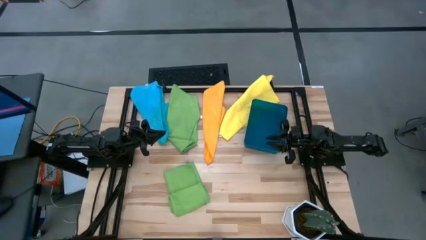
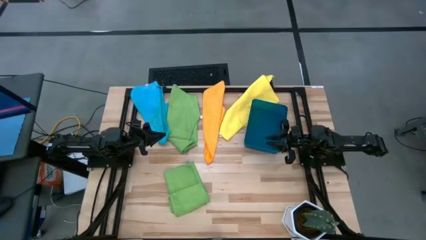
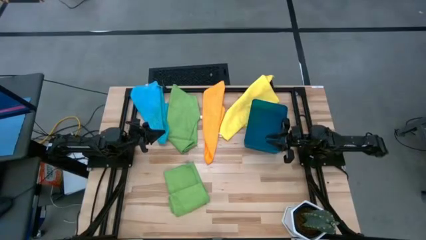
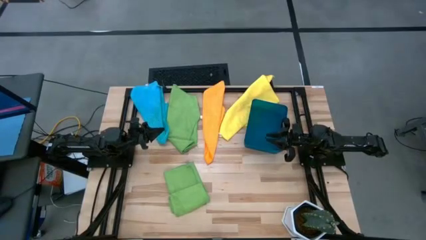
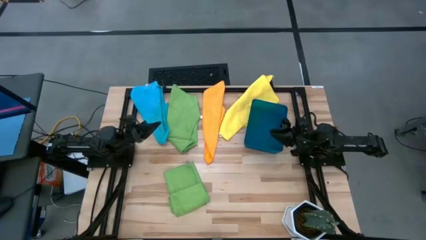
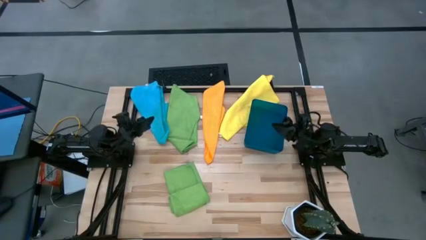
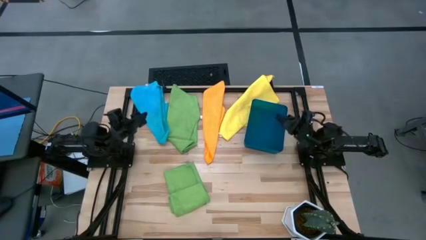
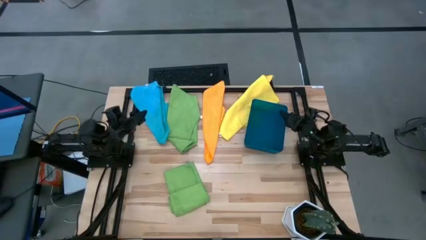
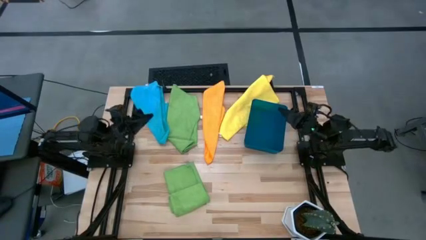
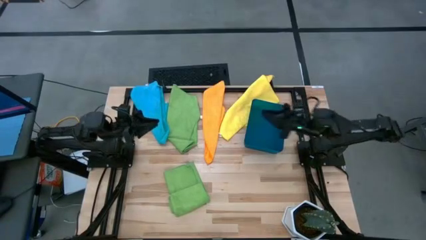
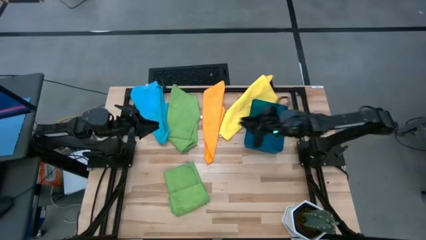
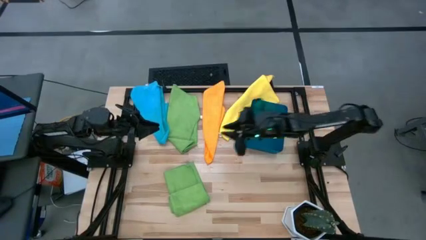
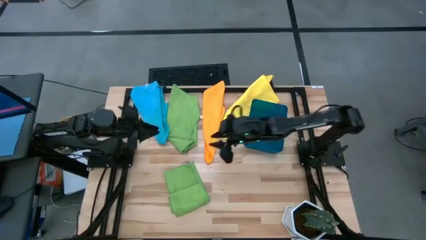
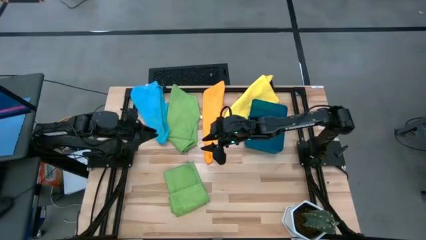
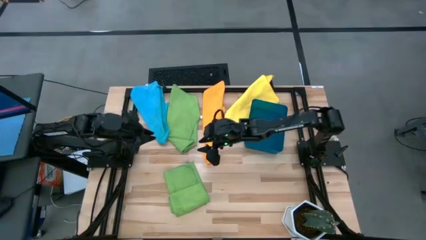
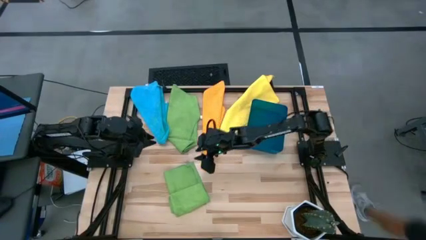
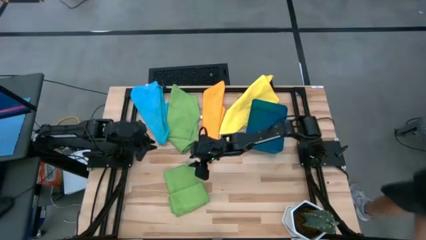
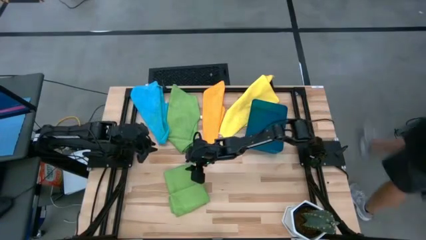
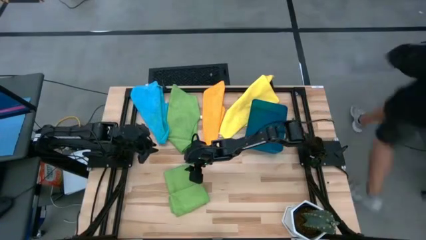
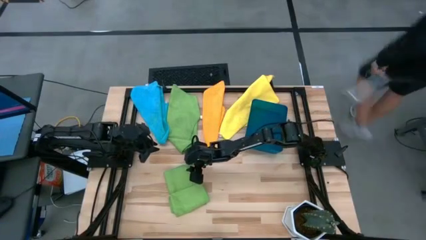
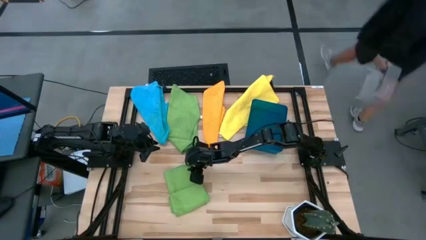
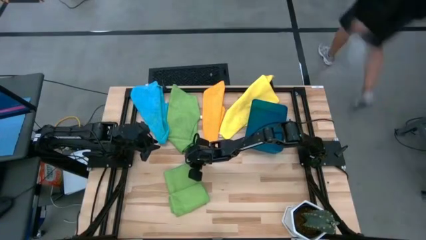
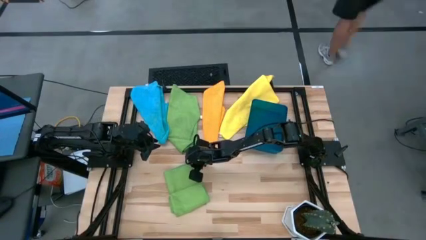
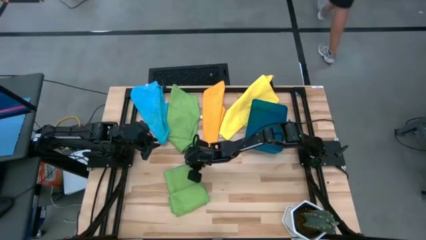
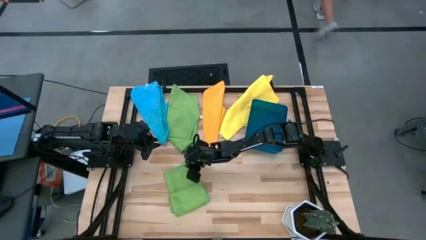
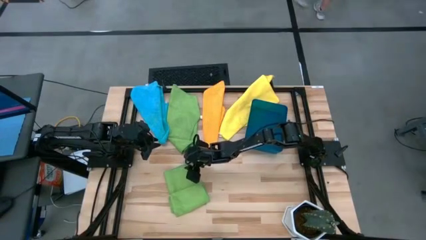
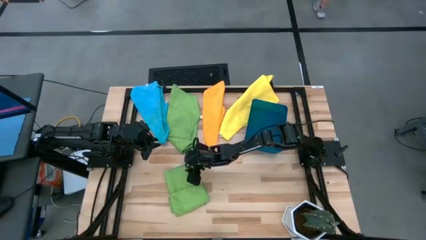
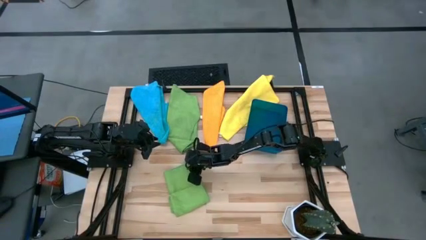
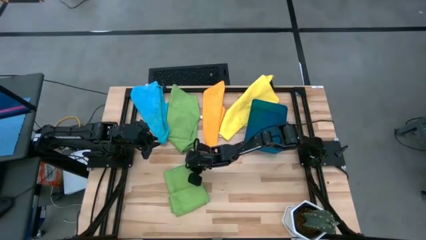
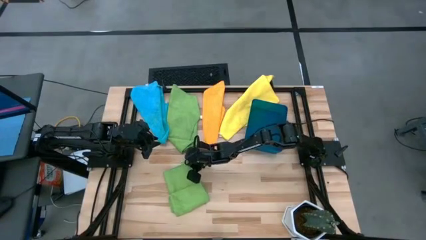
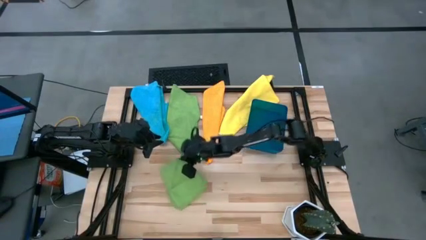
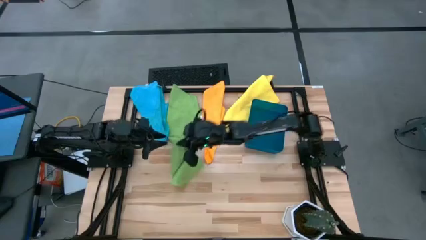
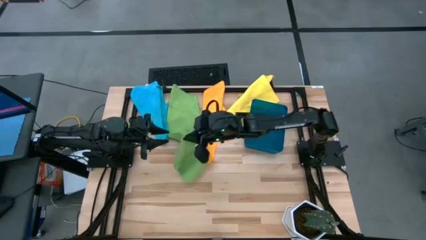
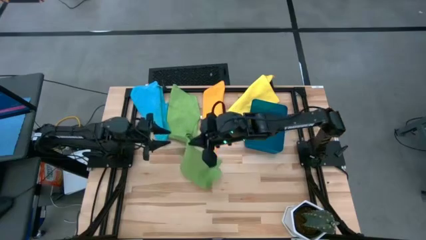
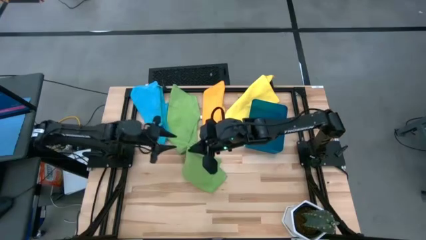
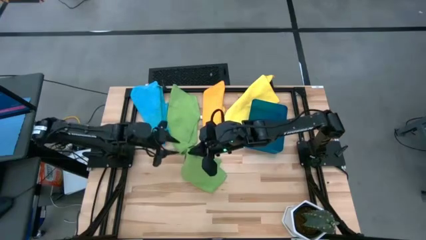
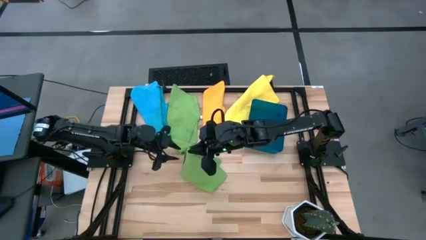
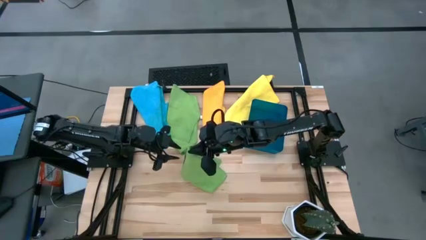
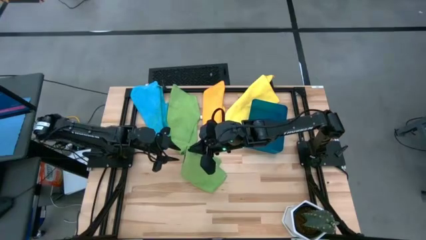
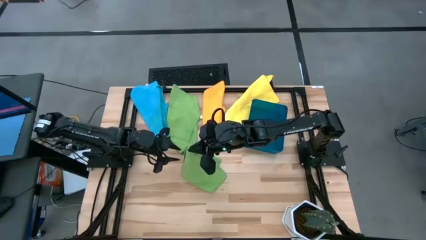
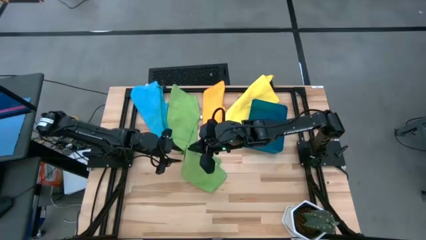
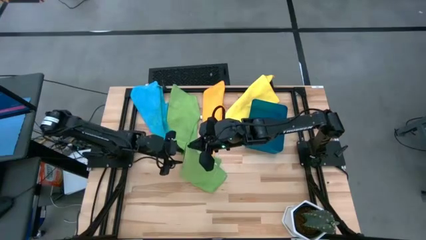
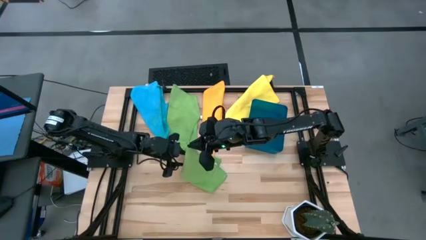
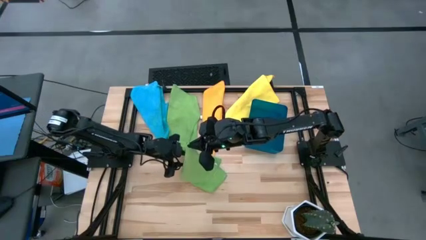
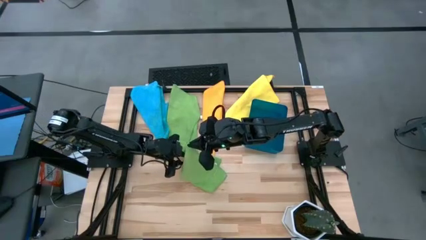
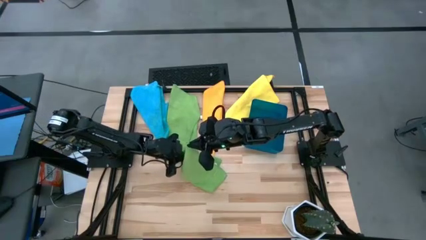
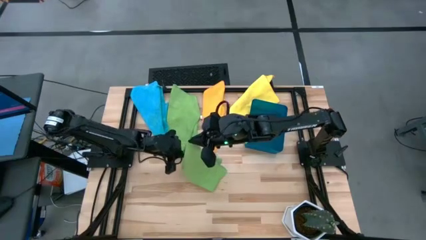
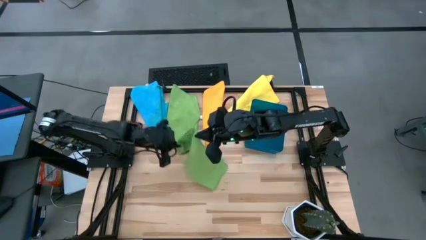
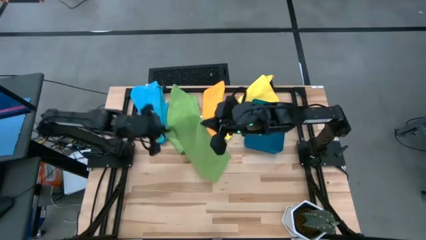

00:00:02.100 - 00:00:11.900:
Task: Fold microfiber towels
Fold the bottom green microfiber cloth

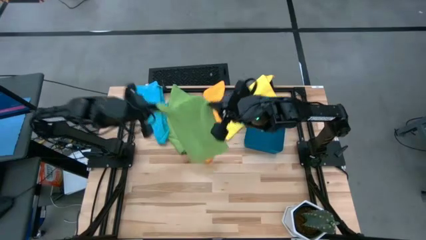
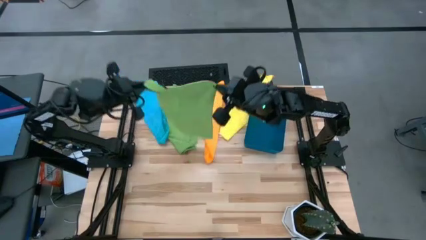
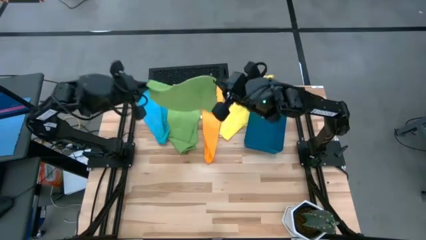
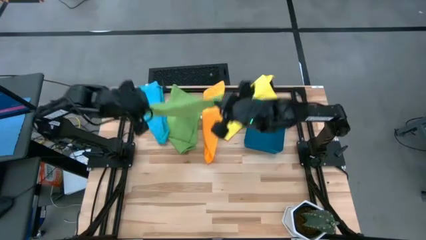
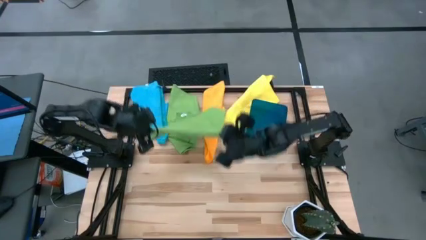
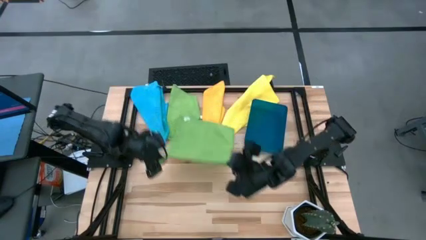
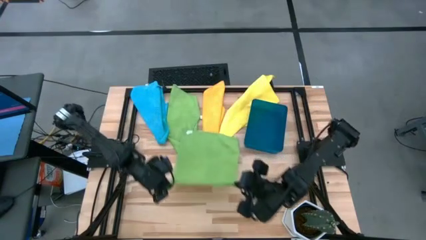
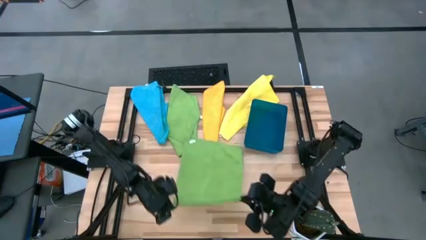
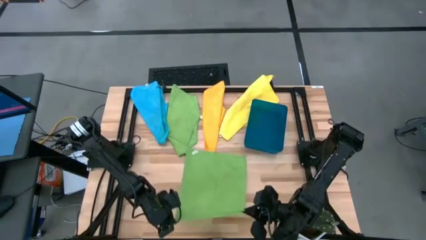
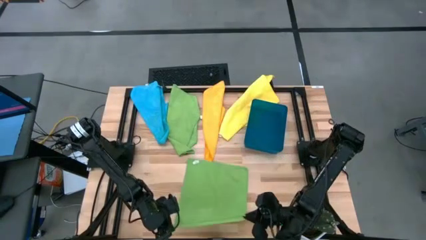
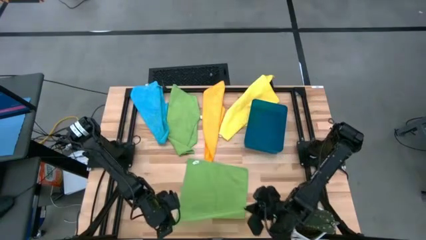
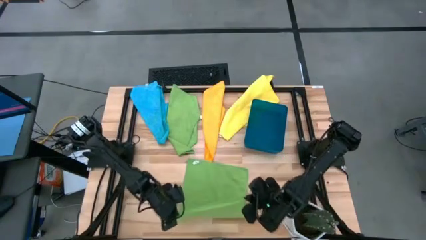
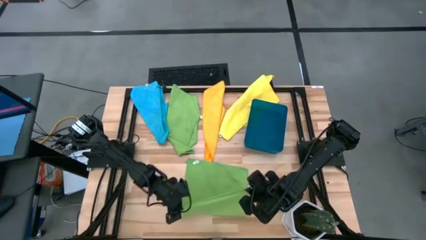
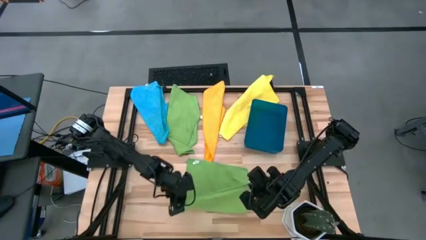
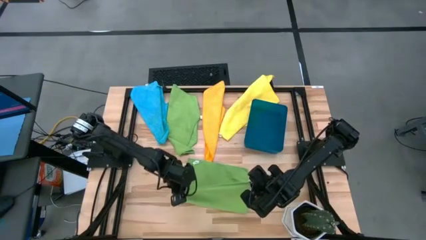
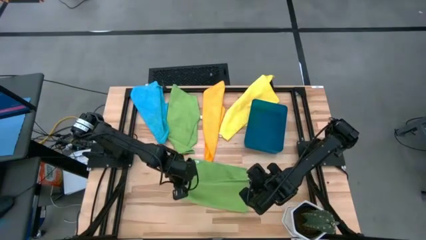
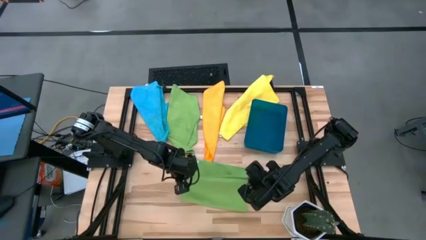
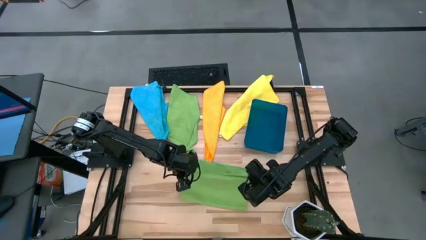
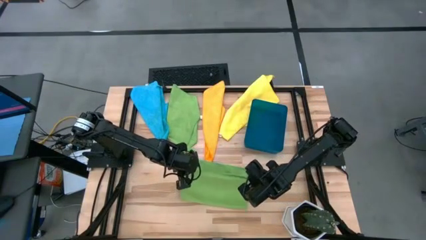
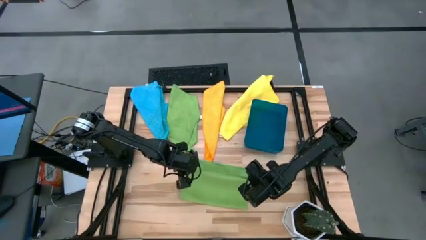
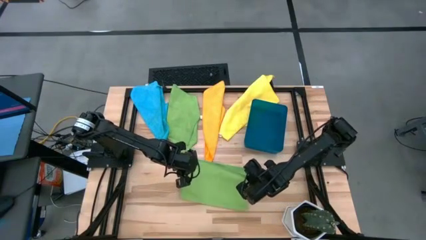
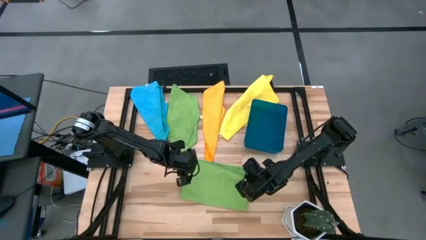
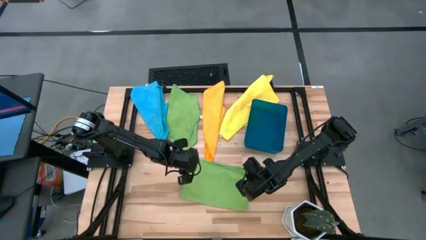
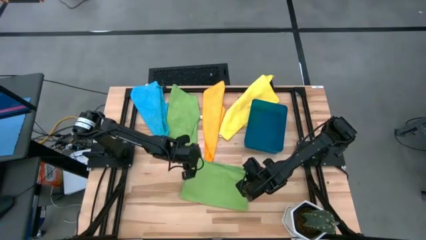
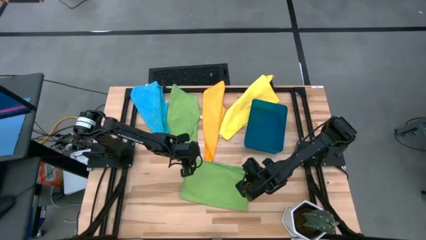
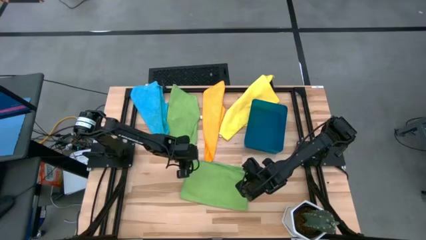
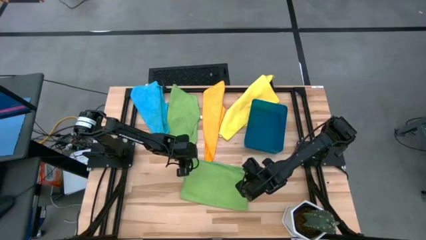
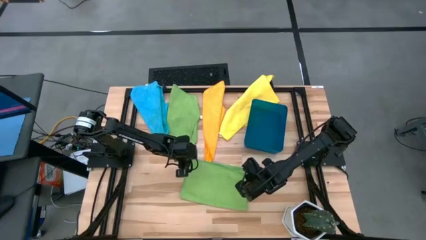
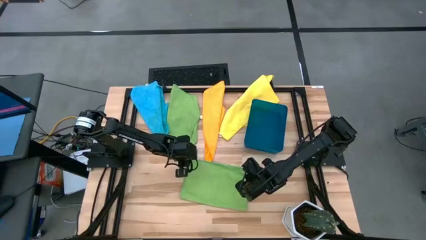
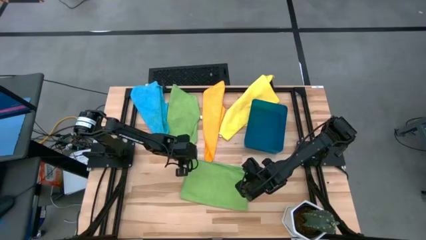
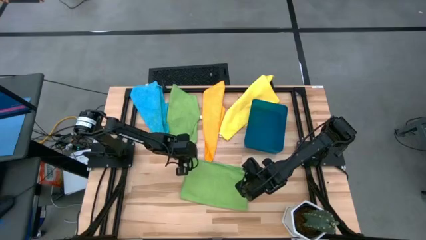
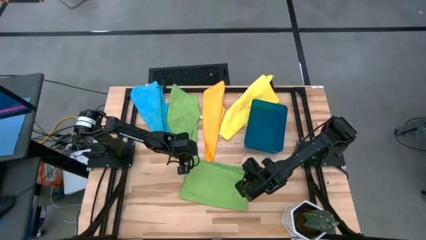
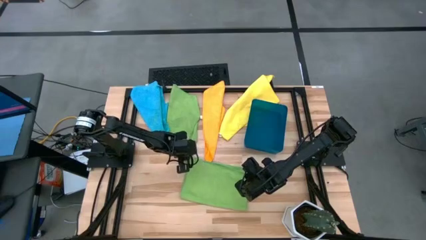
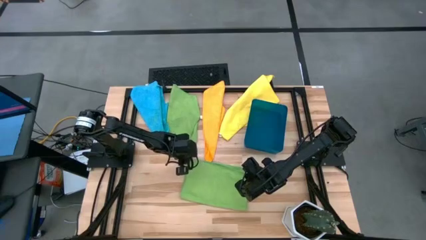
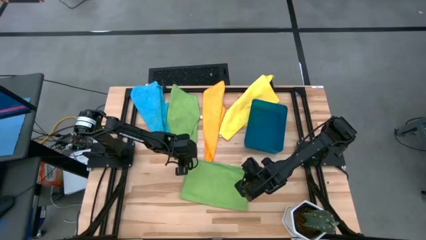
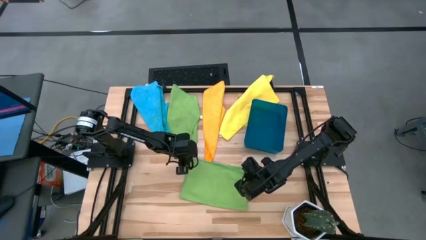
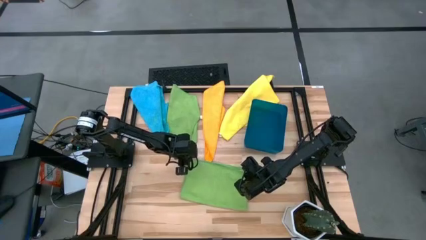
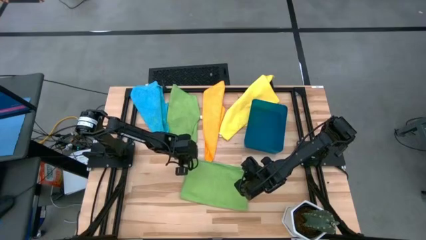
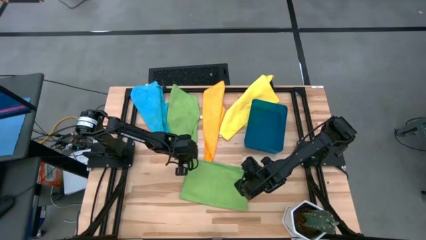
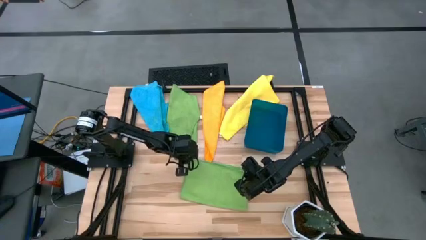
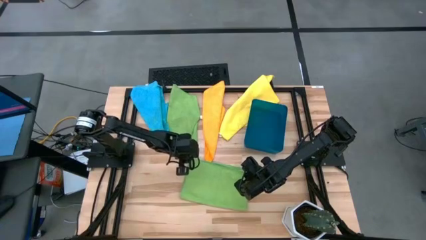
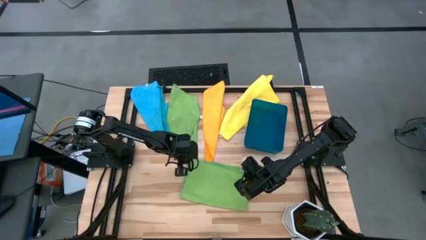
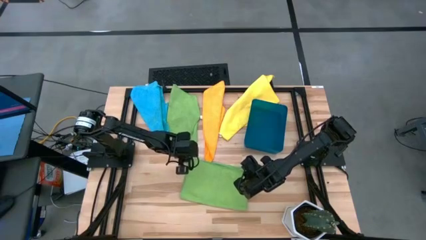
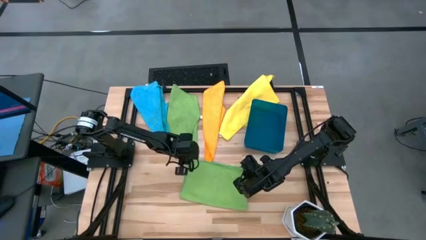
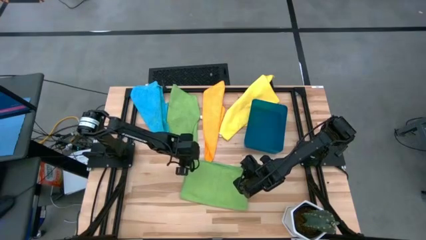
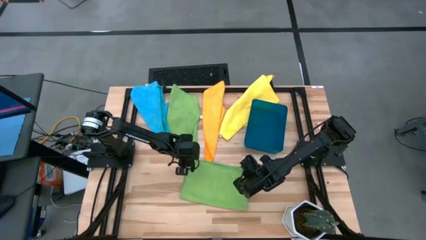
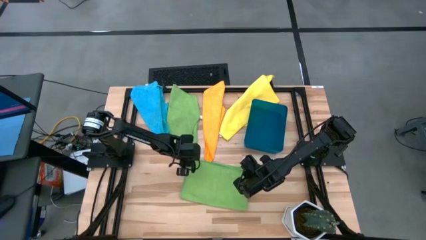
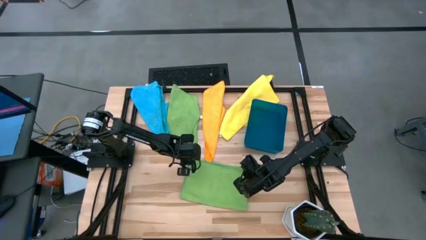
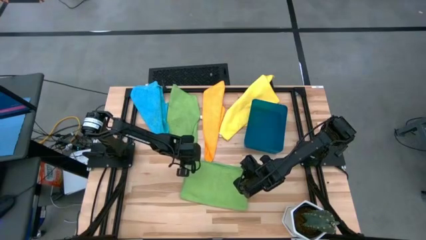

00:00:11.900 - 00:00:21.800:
Fold the bottom green microfiber cloth
